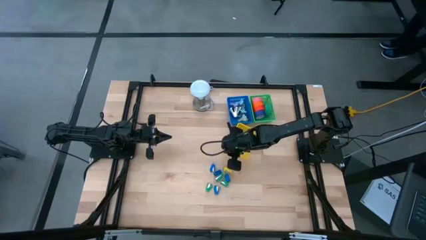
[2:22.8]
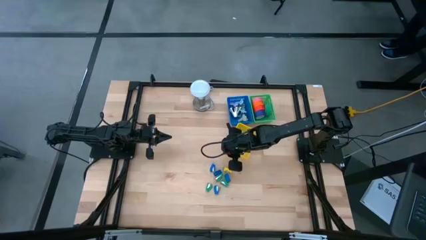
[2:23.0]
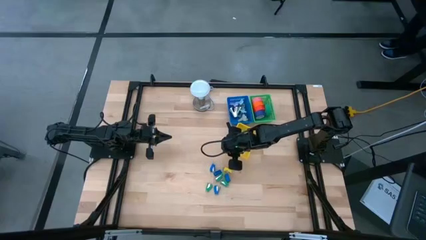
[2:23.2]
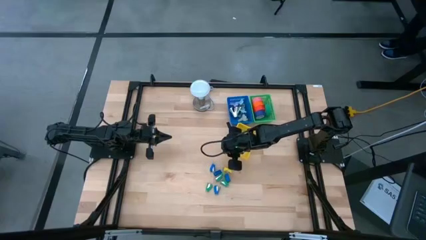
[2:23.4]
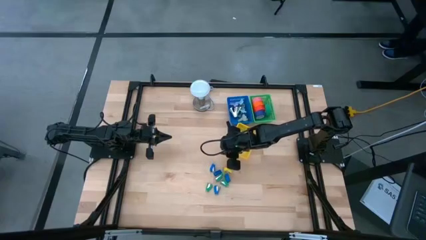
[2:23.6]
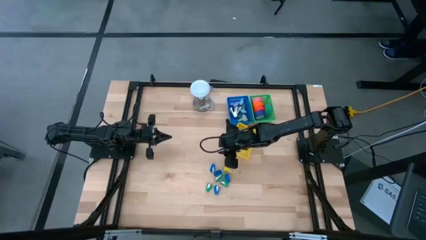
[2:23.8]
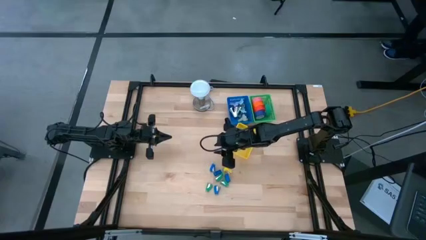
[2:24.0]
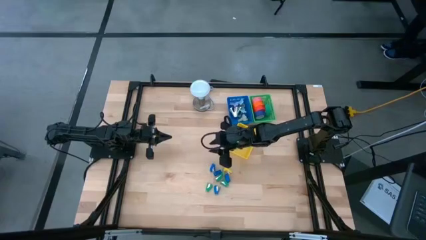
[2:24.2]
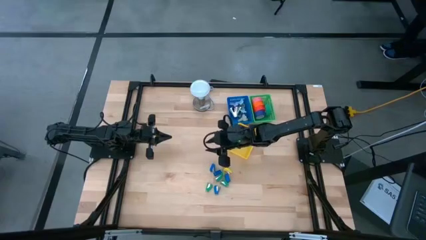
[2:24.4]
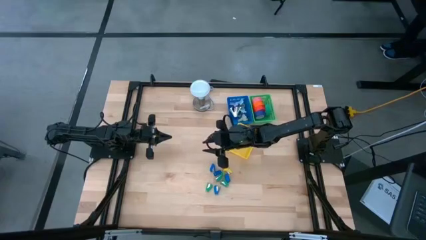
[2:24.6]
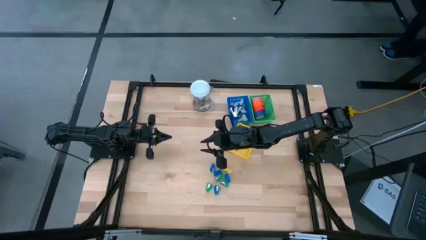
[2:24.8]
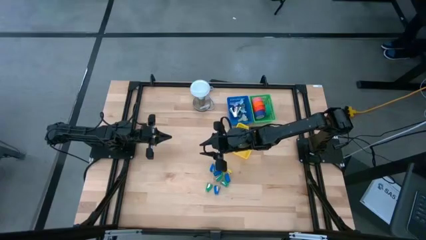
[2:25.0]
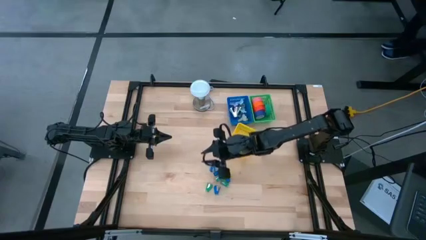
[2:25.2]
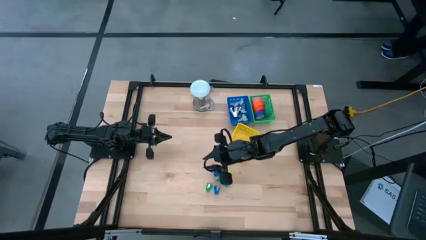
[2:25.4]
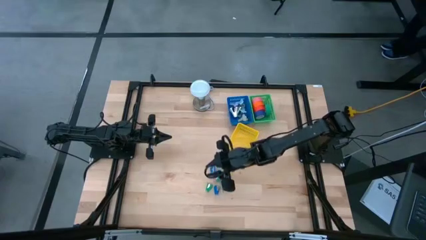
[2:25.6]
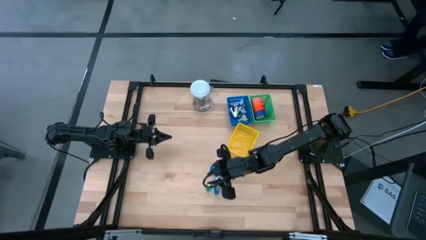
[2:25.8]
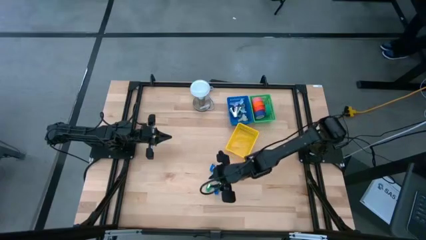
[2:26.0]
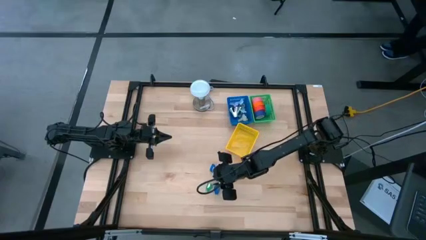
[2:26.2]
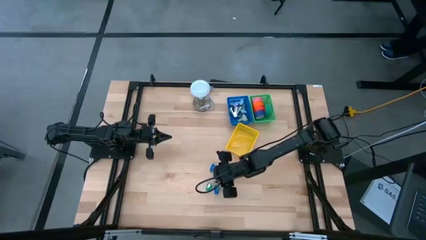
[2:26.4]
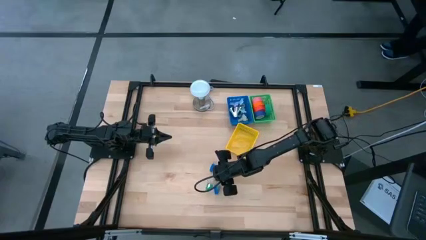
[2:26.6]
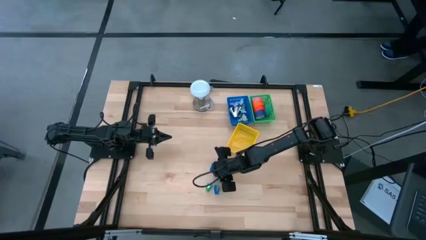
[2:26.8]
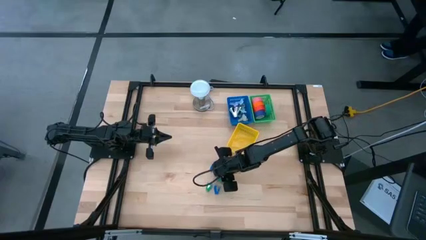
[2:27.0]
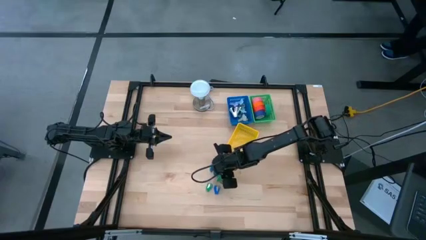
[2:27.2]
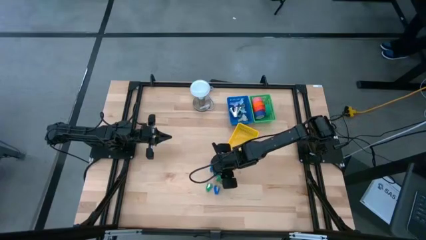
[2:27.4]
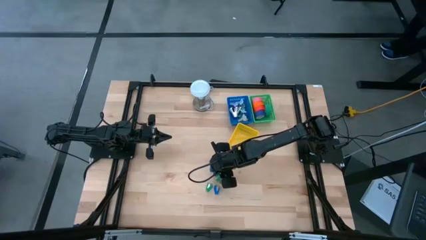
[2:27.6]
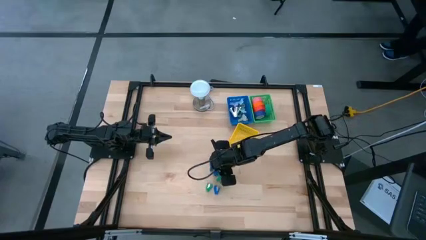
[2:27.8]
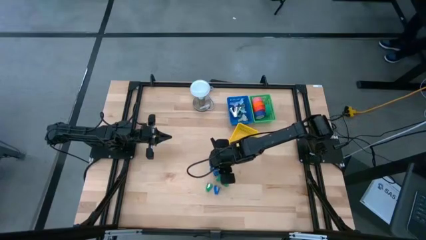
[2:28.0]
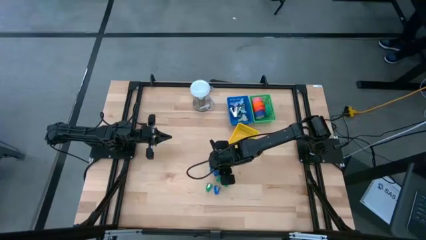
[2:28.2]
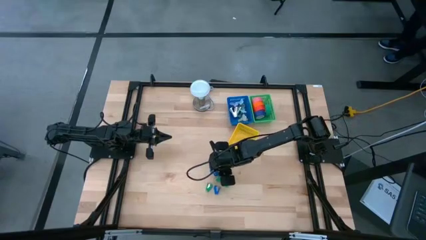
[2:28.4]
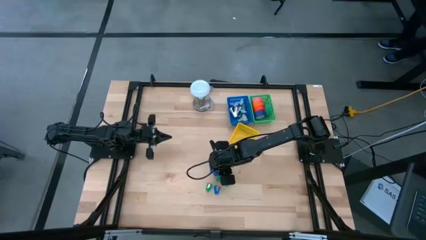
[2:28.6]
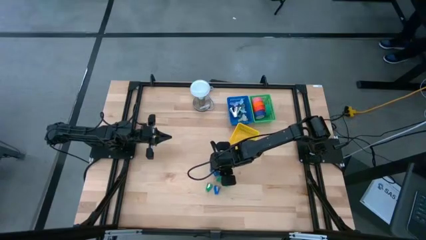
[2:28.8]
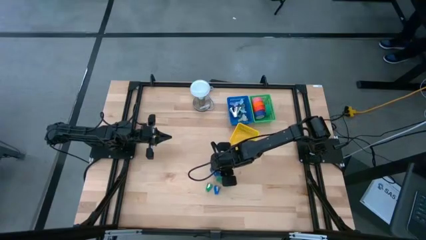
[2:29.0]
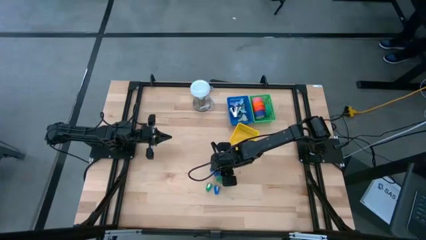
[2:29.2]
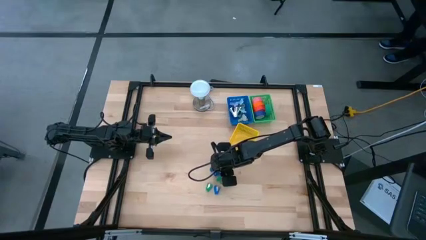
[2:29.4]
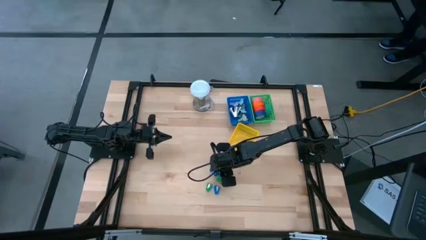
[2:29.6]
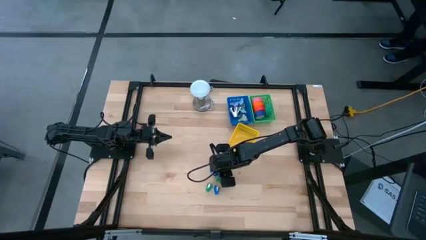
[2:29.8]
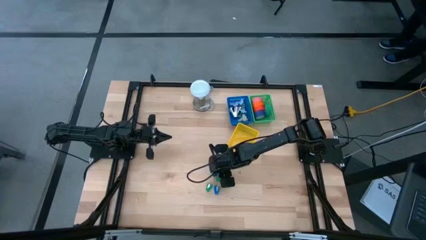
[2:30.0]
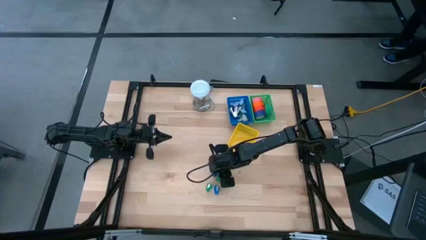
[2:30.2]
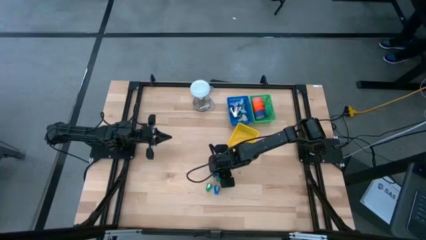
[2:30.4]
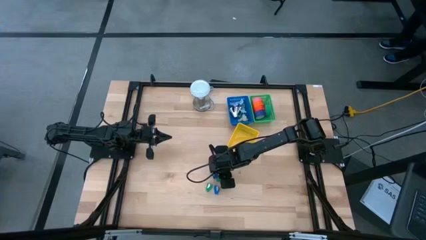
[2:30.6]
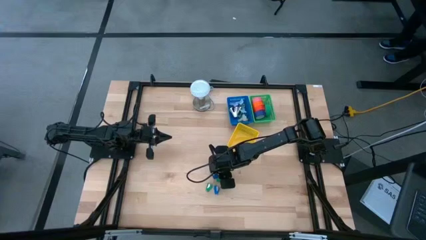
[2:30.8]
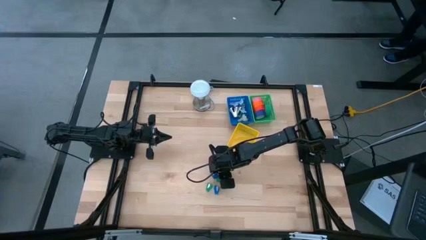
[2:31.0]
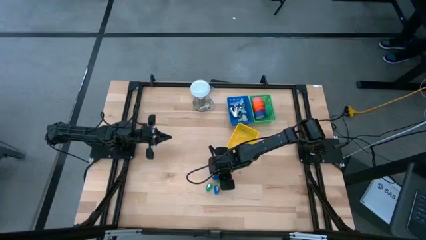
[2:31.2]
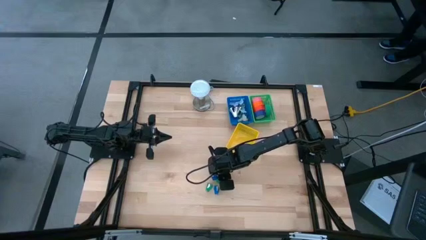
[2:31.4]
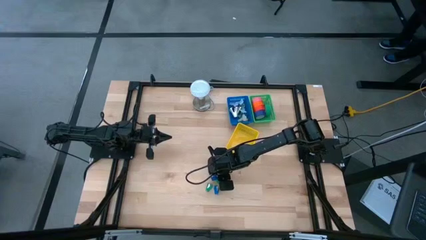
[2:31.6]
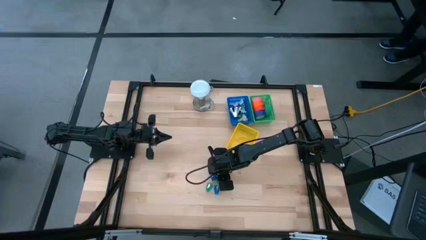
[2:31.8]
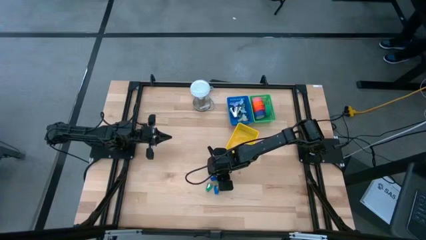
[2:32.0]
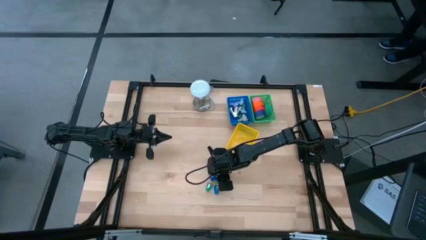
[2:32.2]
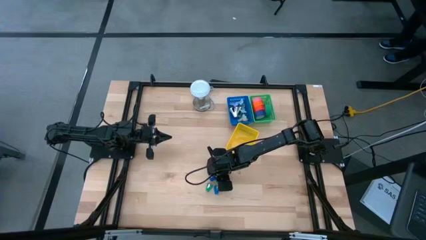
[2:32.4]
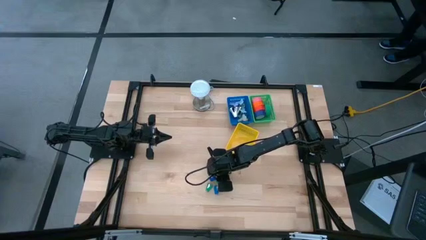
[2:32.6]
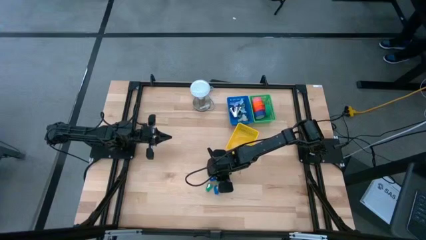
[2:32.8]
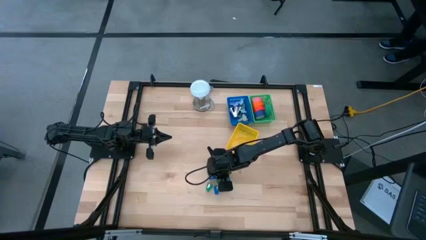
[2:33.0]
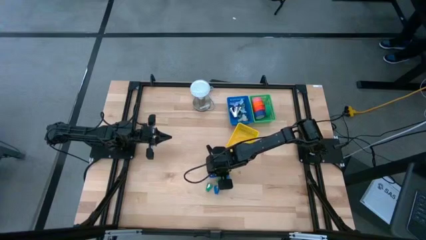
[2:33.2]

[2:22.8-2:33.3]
Task: Pick and place Stapler, Stapler remover, tape
Put the blue stapler into the yellow bin

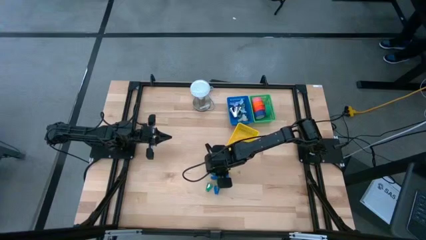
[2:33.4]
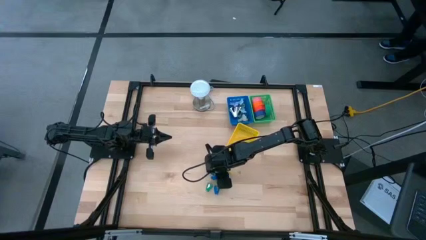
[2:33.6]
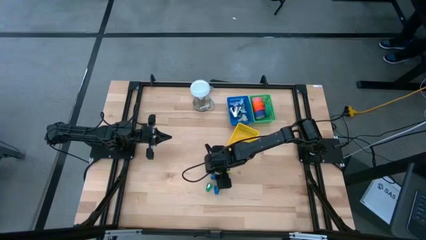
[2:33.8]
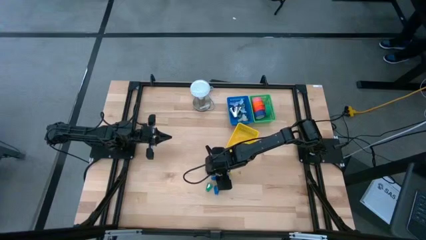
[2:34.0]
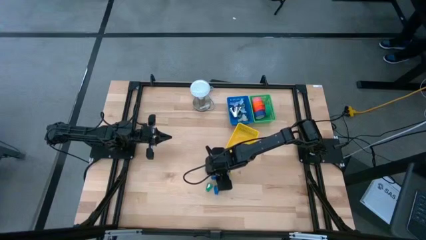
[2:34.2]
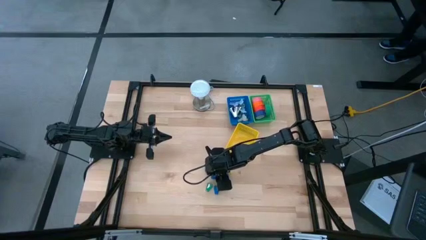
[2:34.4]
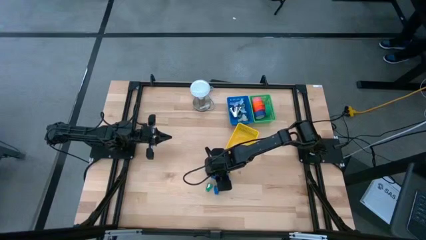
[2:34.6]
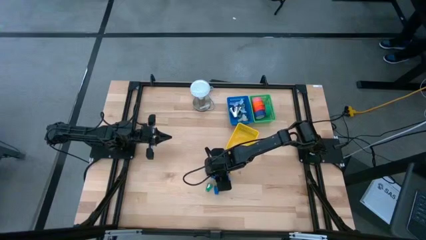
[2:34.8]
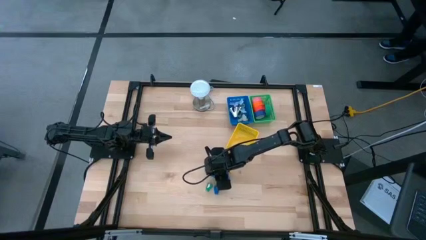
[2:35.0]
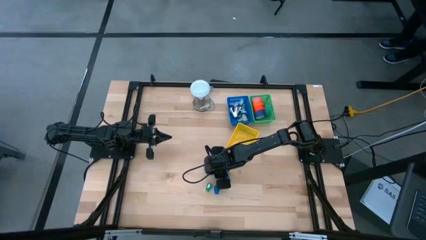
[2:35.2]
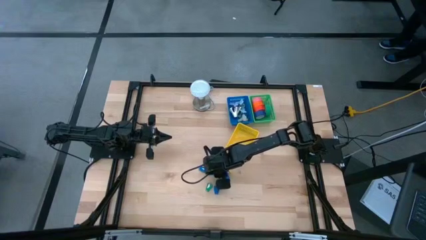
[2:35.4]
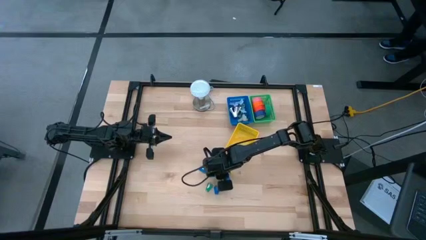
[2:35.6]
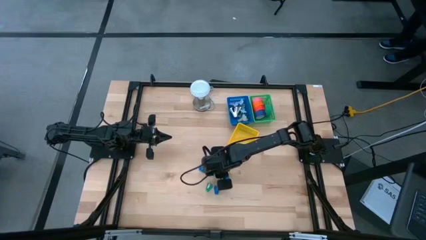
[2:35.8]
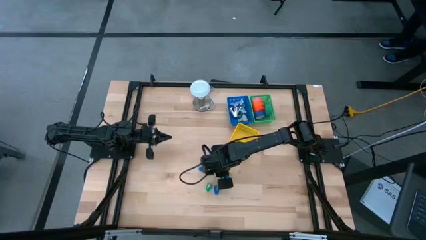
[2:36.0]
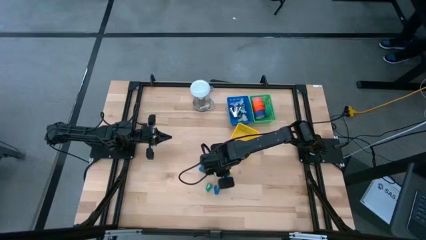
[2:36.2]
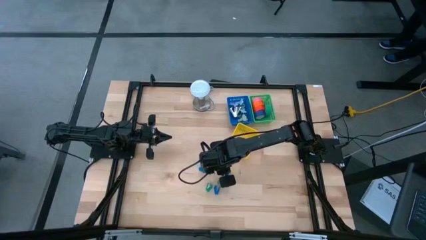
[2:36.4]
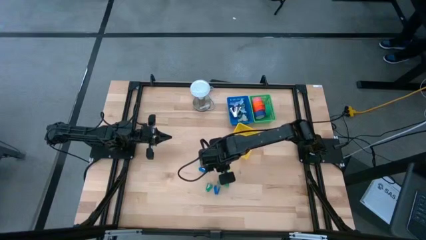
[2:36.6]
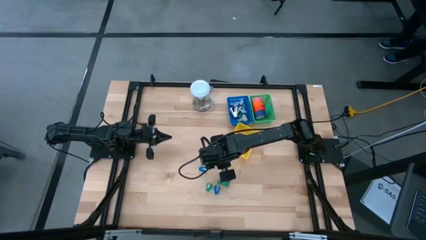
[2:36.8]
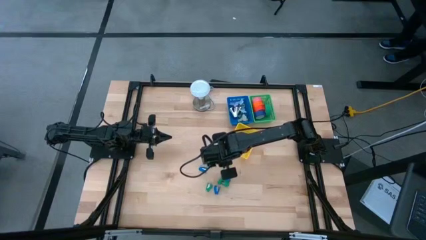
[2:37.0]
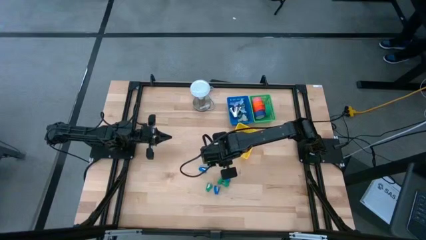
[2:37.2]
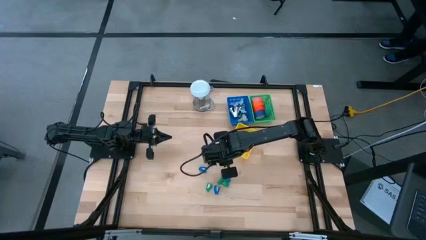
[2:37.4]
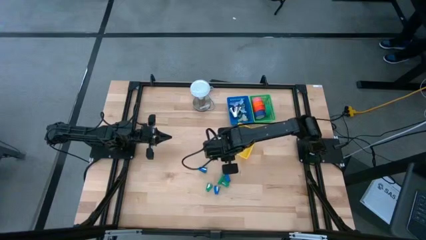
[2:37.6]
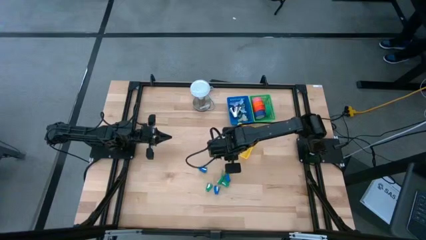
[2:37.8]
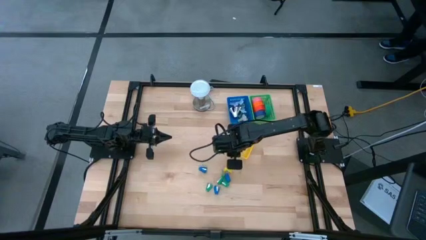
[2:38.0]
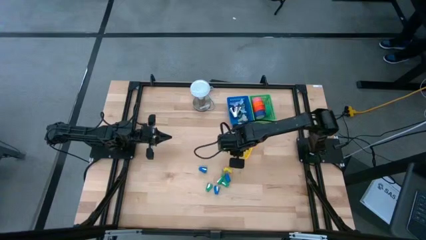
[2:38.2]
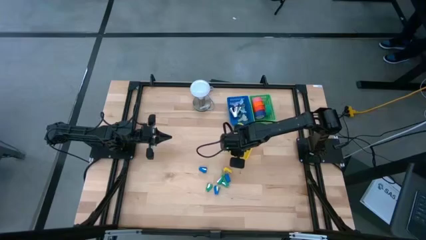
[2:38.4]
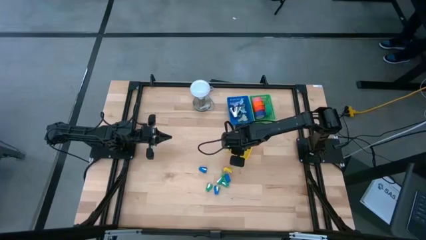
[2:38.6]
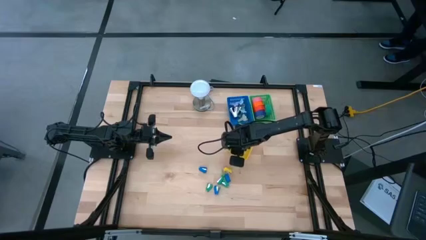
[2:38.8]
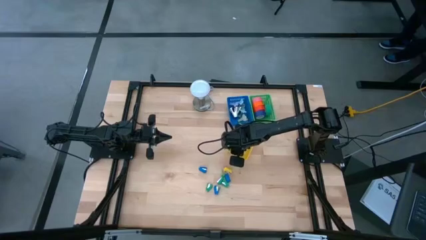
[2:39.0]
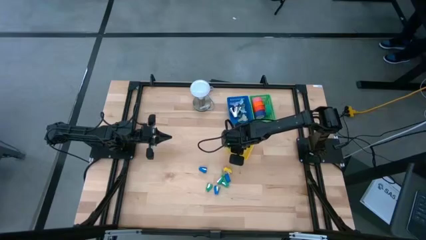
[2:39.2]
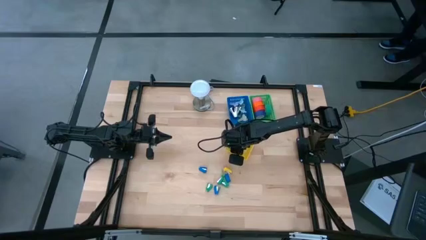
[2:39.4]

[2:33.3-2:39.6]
Put the blue stapler into the yellow bin
